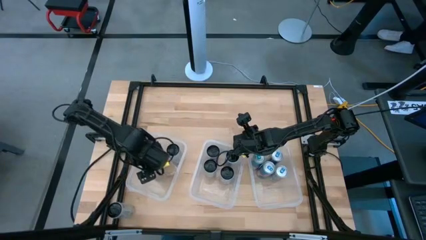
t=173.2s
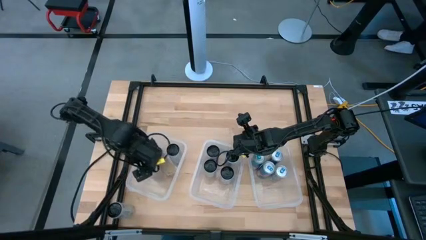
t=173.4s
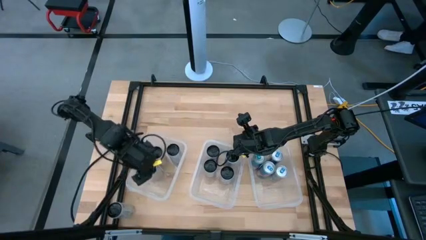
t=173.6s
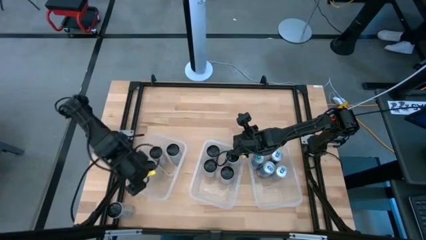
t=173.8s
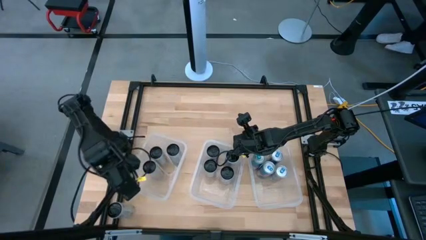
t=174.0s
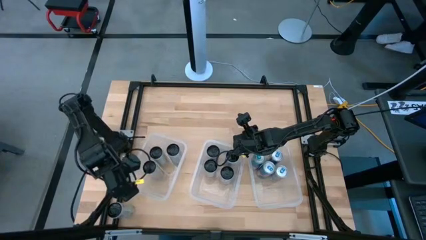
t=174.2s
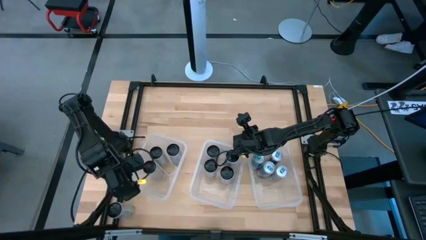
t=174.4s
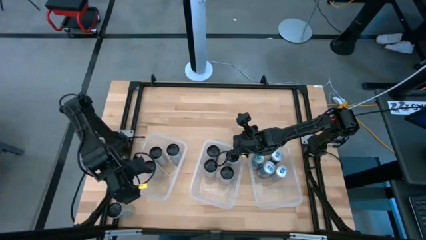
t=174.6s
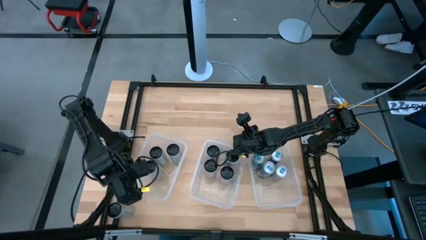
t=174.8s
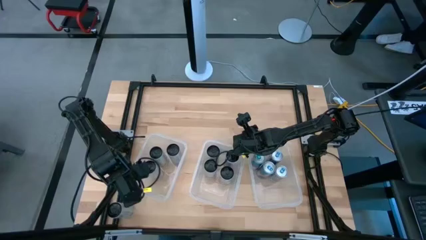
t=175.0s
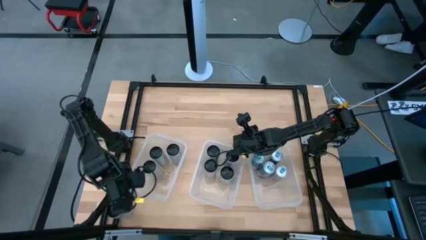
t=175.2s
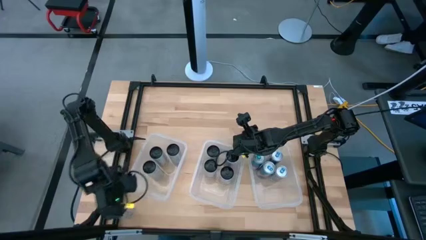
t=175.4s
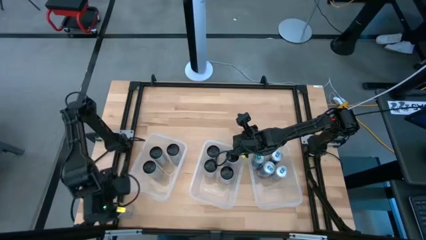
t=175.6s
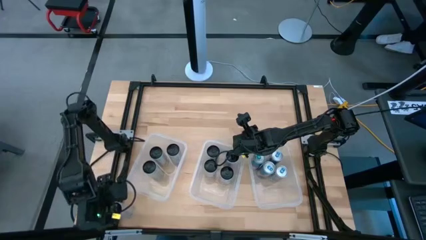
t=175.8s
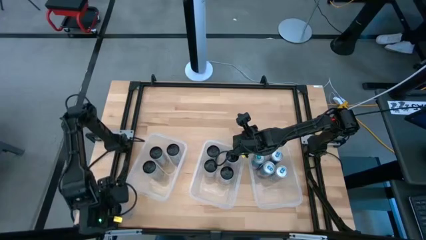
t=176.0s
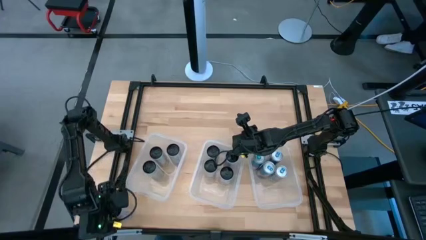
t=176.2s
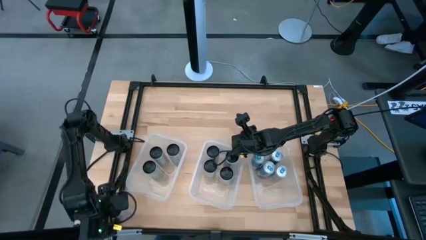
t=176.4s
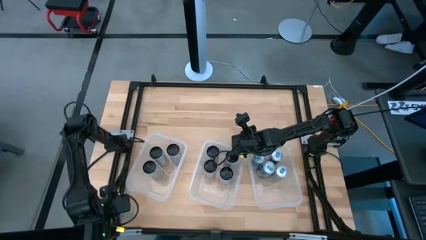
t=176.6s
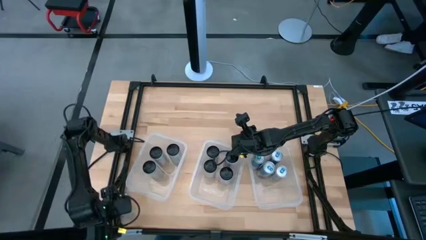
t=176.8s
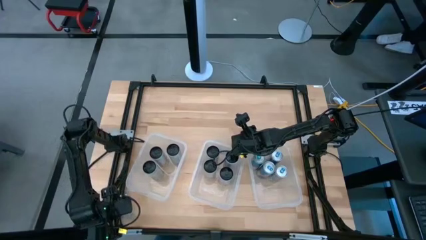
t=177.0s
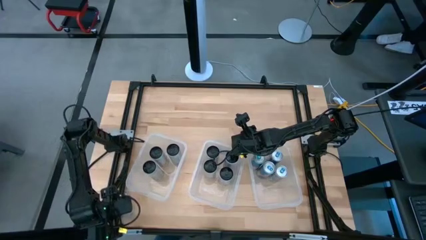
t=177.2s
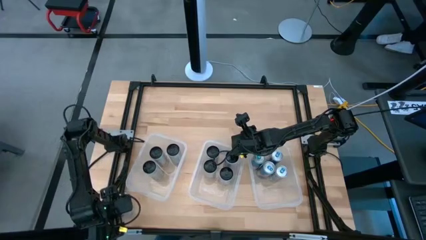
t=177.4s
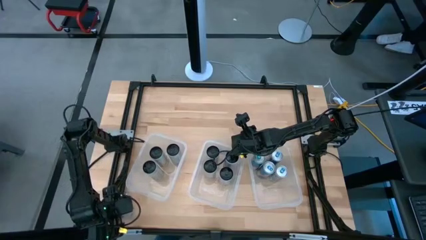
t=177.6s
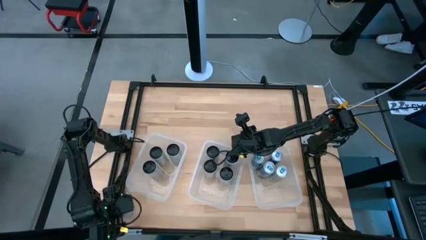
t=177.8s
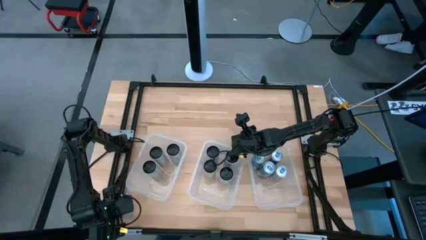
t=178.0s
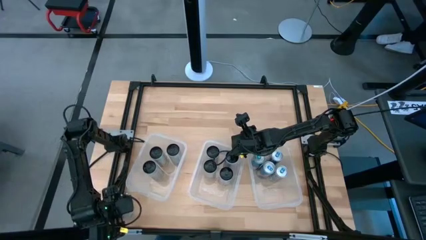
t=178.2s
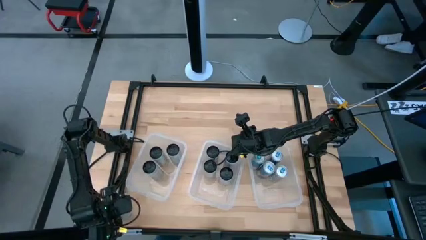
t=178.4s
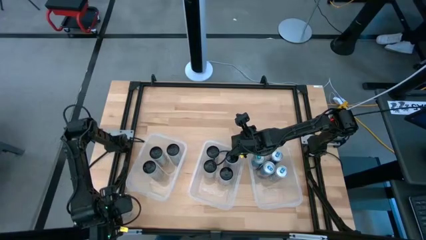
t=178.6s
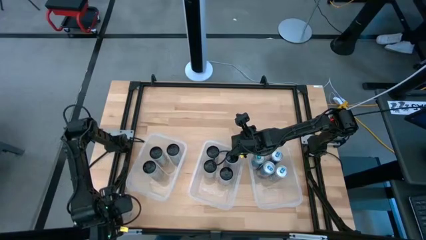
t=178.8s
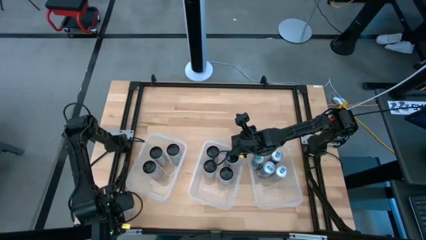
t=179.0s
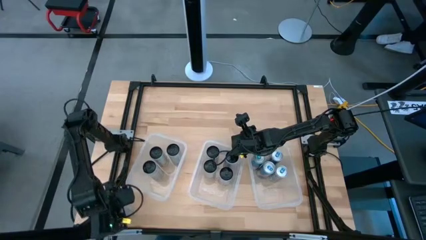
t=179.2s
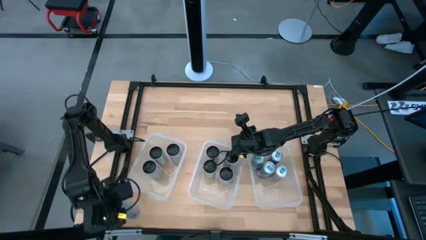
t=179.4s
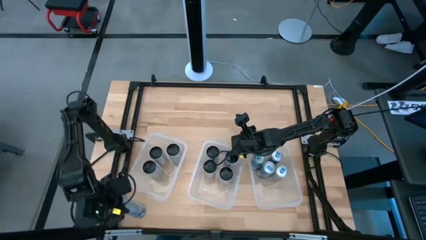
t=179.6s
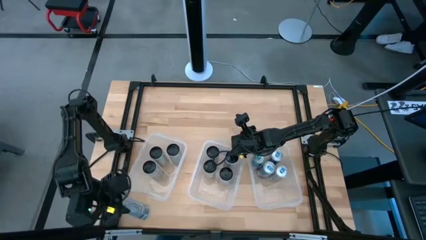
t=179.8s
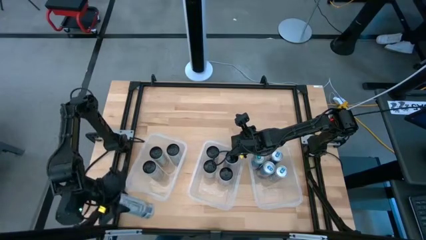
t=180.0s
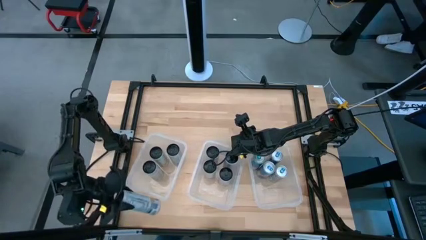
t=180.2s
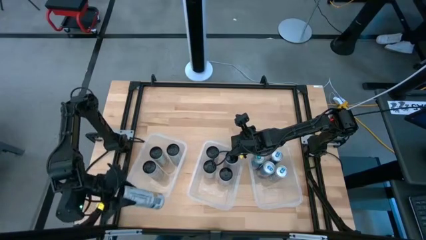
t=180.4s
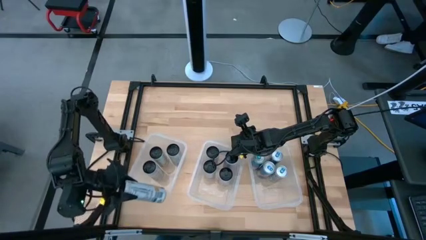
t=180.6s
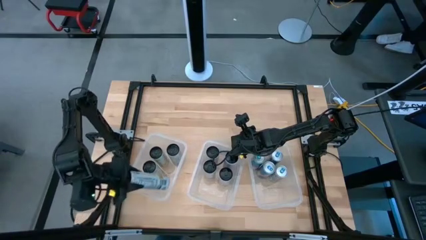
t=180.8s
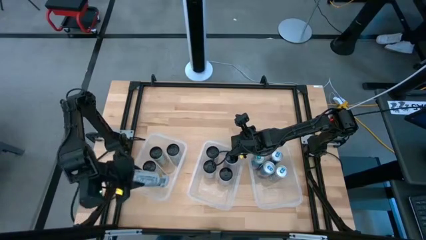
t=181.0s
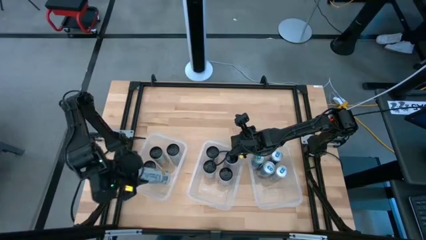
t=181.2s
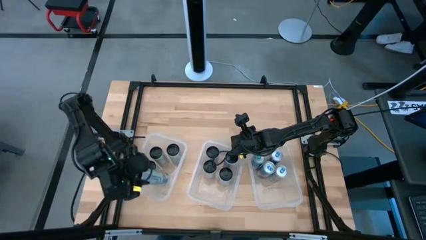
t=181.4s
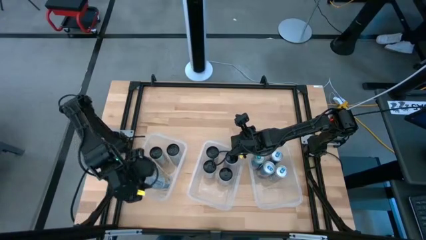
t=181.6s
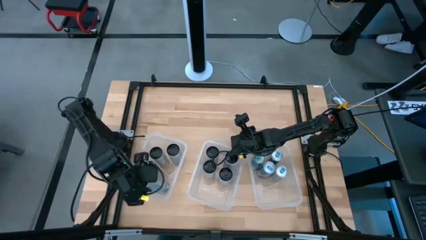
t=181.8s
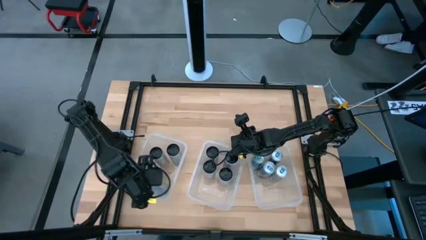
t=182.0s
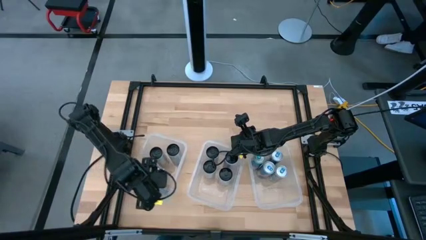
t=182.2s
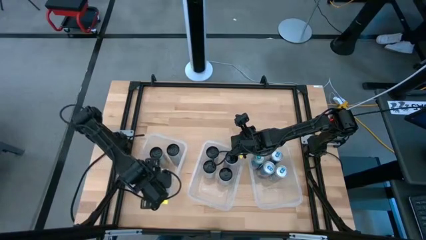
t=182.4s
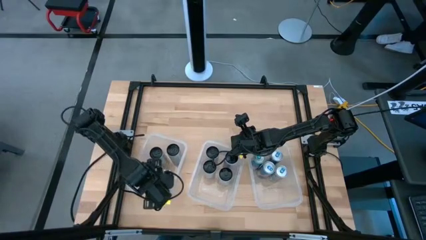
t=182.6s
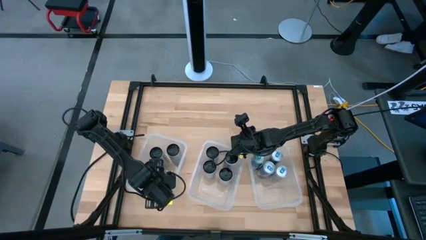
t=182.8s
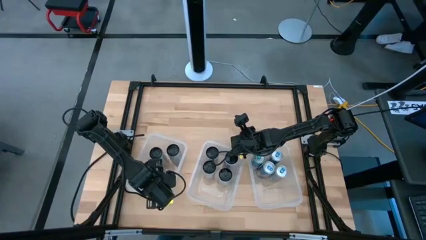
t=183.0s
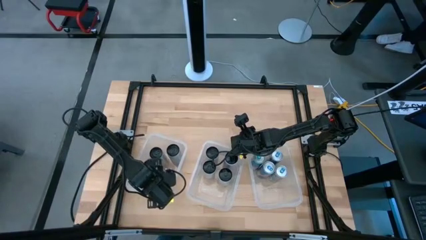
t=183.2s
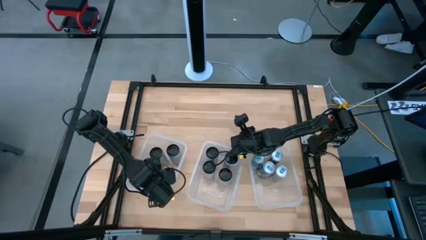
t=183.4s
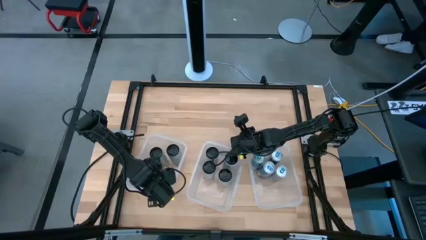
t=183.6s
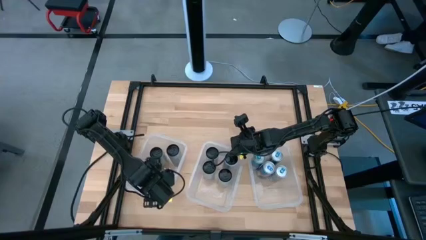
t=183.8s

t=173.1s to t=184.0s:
Task: Sort soda cans
Put the white-yellow soda can into the left transparent bin

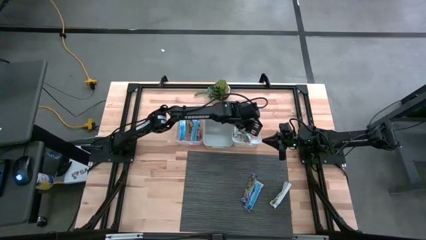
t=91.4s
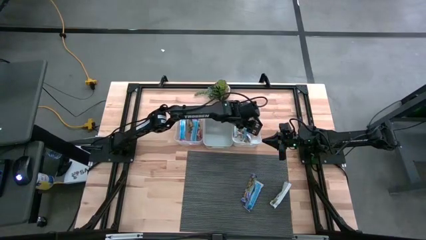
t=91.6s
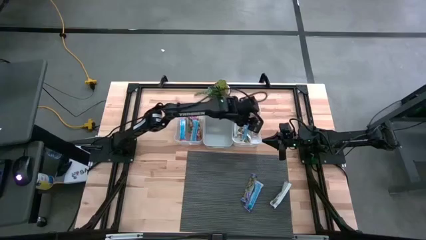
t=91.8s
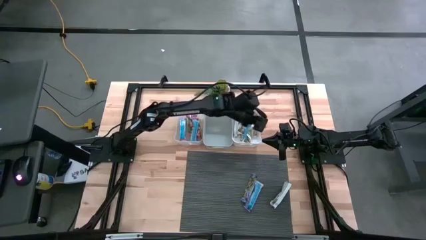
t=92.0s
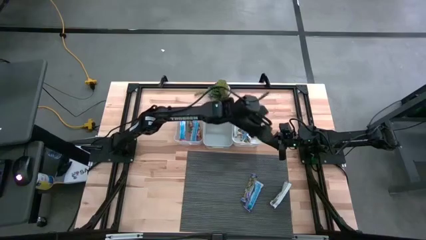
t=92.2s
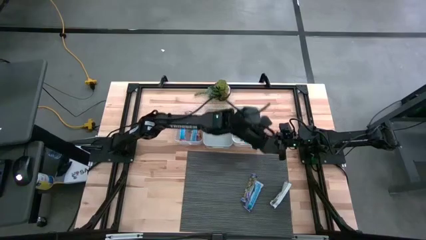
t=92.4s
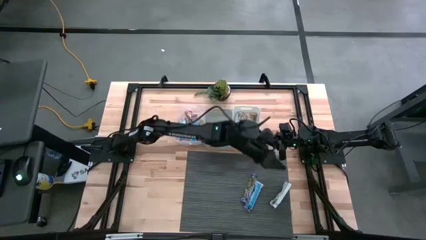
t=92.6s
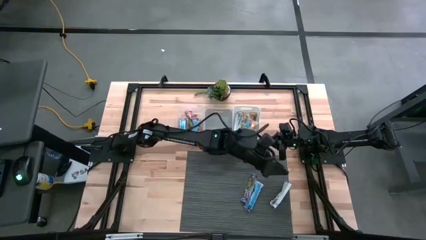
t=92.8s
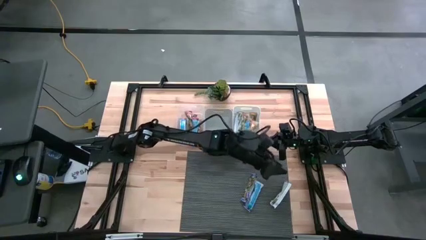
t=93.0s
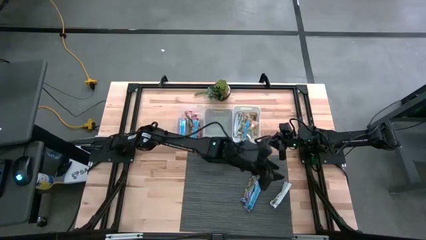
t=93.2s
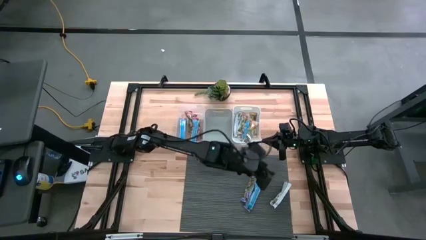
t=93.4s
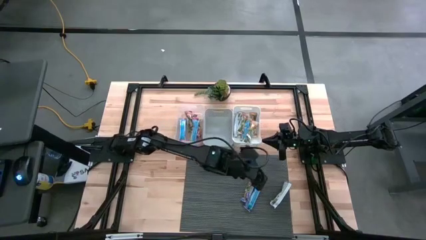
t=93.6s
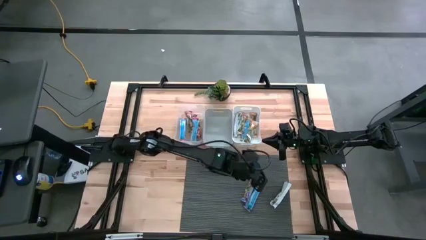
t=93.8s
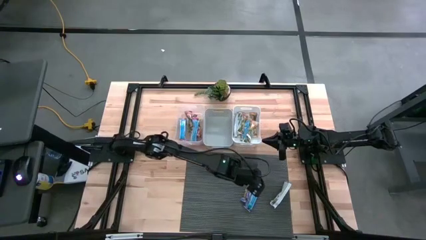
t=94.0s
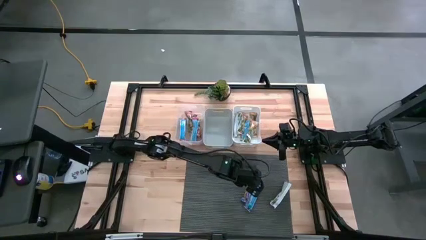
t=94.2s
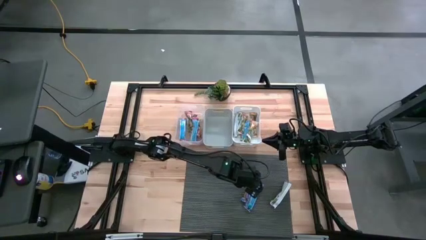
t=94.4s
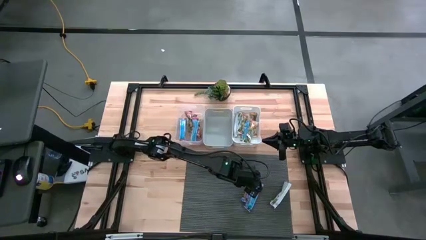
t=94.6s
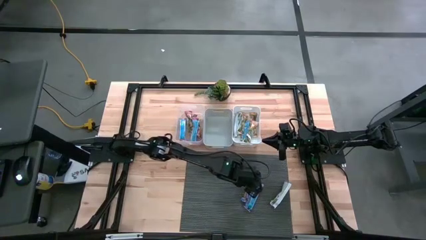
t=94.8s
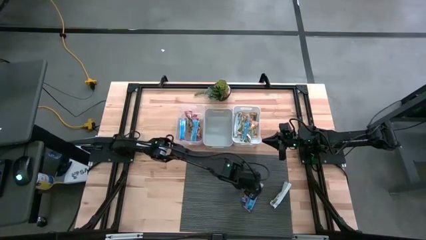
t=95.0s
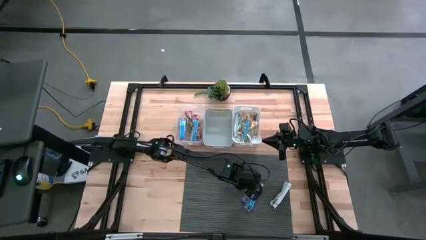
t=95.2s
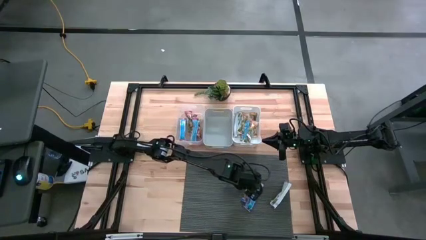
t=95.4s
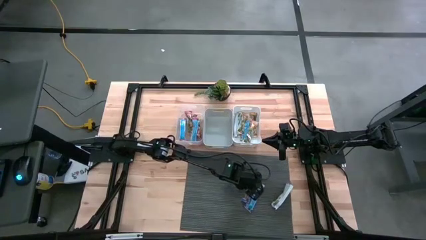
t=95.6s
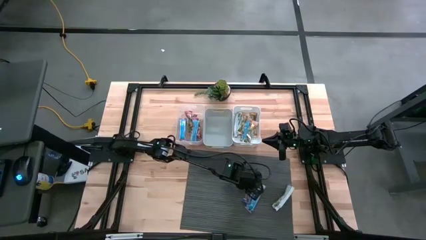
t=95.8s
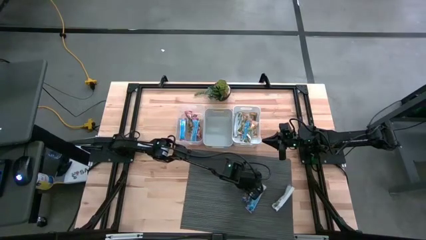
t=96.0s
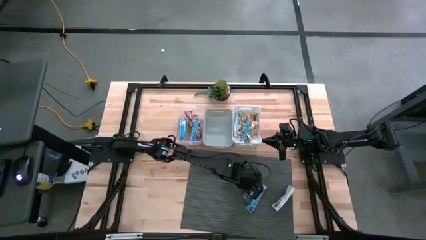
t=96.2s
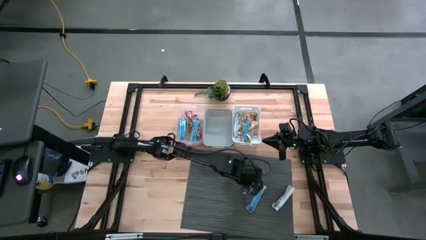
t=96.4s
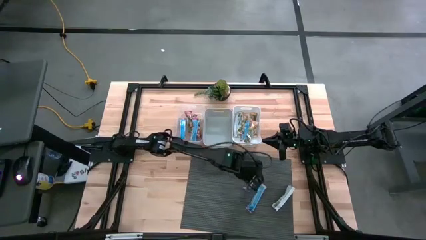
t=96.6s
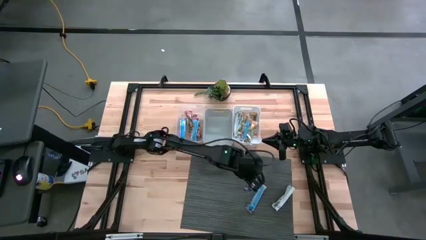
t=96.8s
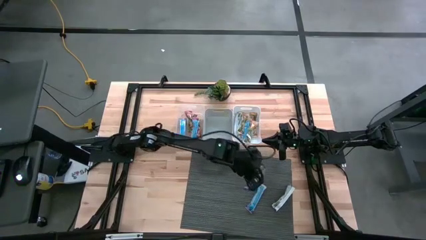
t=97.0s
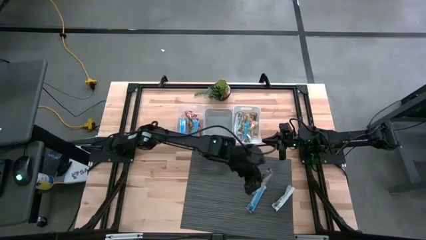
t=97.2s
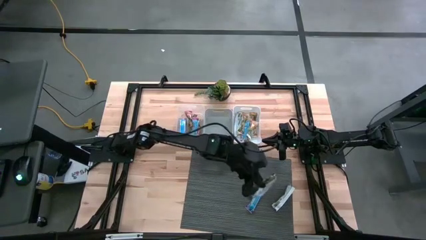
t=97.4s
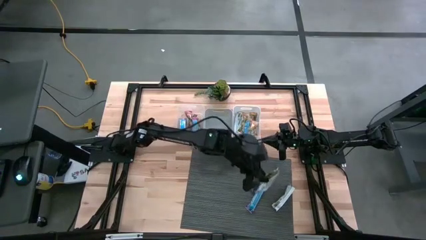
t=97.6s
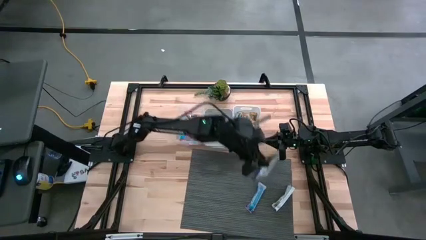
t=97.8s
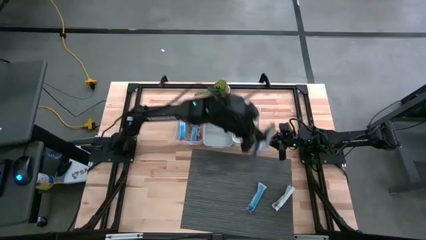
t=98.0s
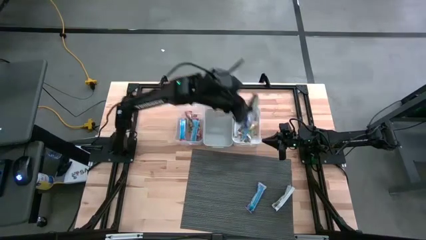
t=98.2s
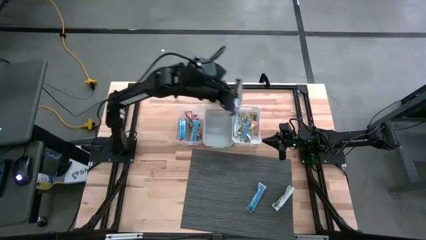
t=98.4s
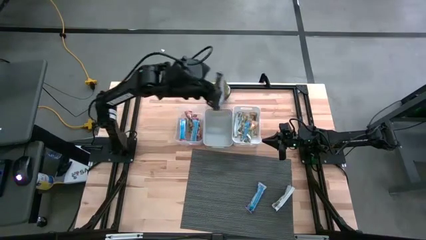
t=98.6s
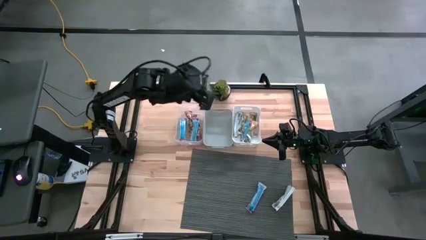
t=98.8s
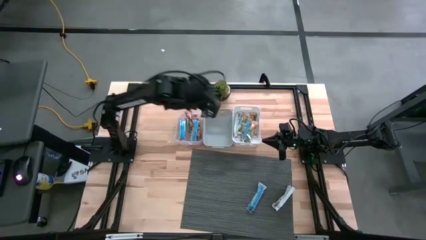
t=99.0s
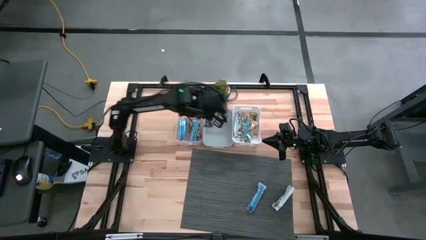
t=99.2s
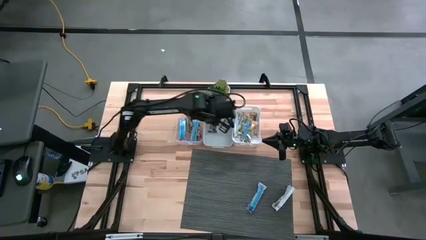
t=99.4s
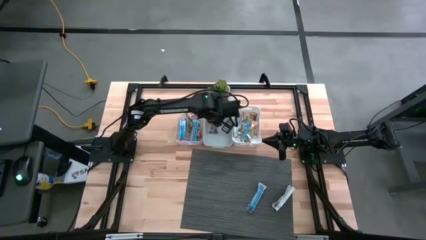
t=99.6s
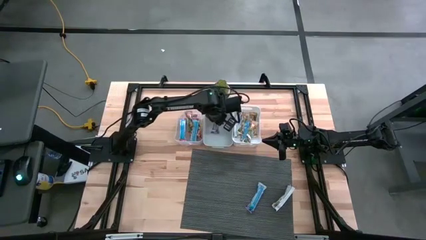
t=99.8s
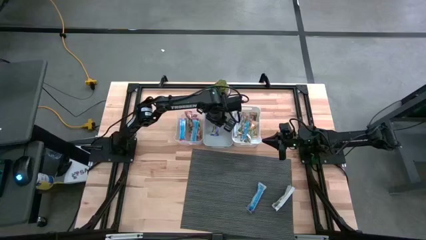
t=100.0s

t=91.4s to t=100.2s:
Task: Pick and place Granola Bars by type
Put the blue granola bar into the gray bin
